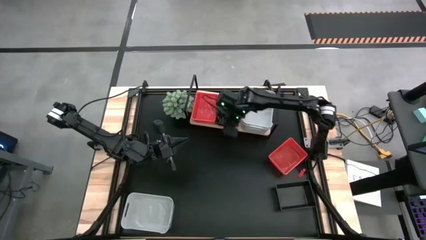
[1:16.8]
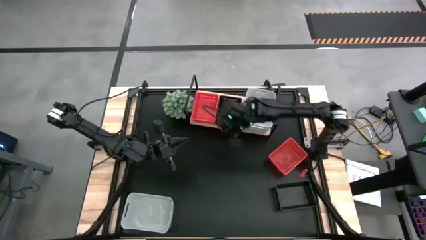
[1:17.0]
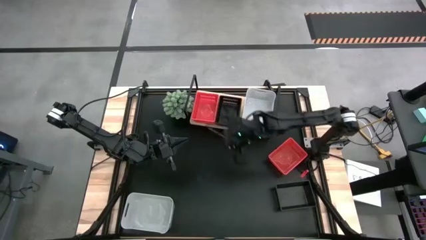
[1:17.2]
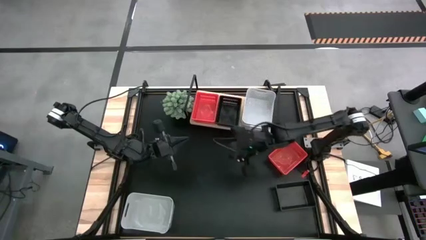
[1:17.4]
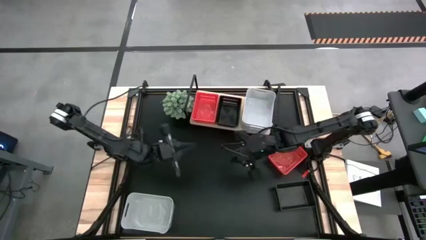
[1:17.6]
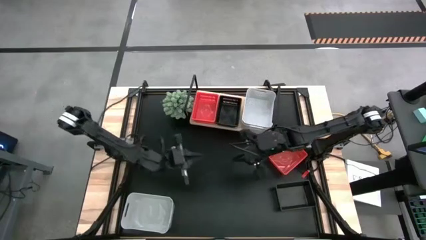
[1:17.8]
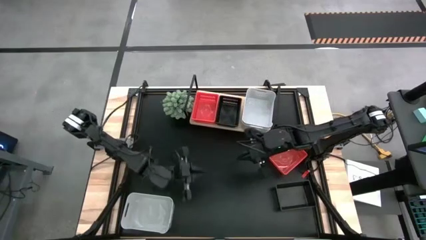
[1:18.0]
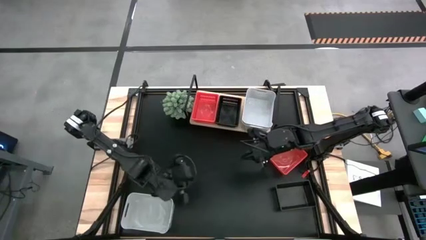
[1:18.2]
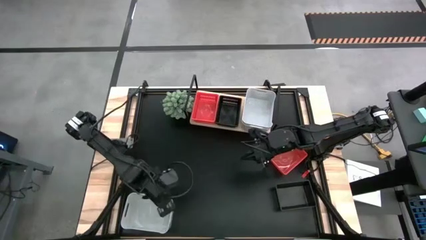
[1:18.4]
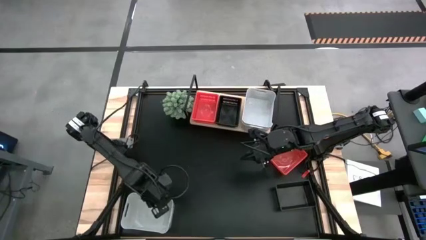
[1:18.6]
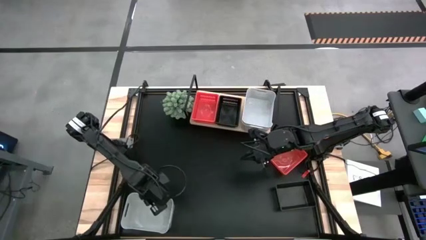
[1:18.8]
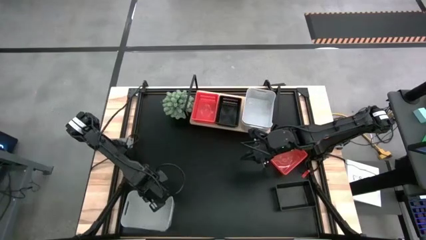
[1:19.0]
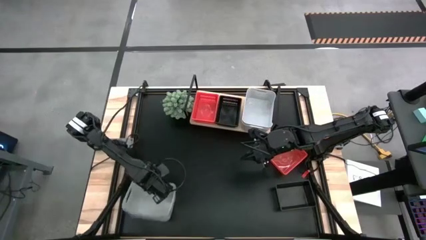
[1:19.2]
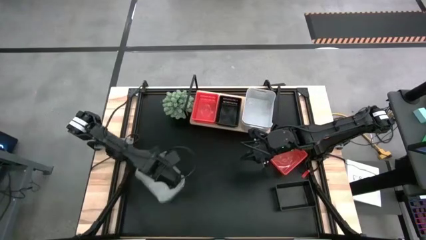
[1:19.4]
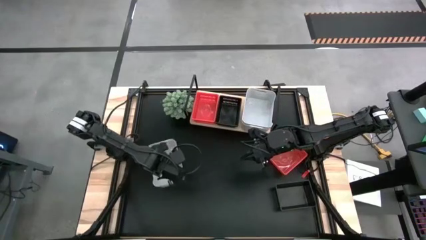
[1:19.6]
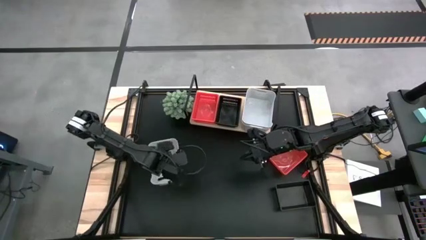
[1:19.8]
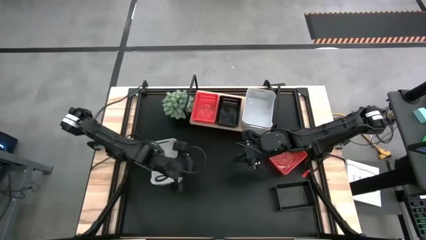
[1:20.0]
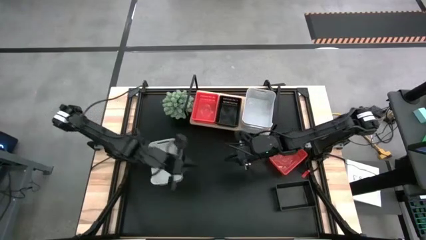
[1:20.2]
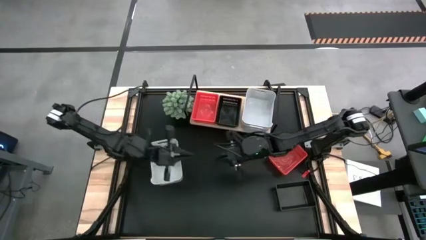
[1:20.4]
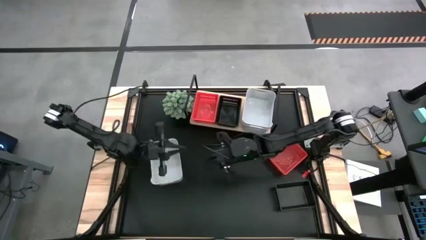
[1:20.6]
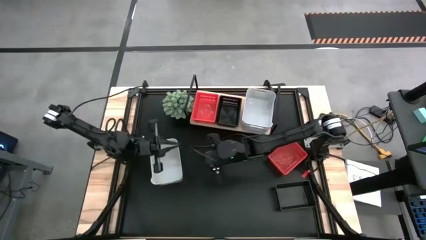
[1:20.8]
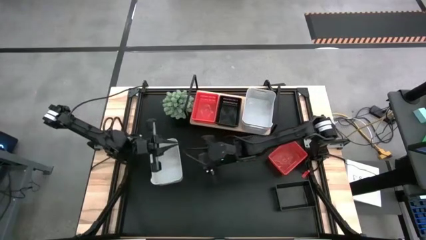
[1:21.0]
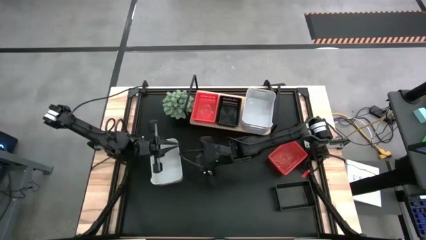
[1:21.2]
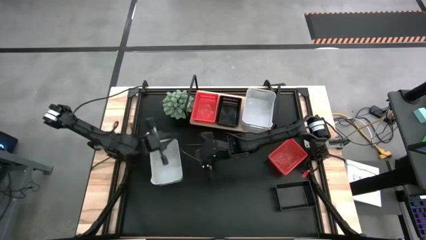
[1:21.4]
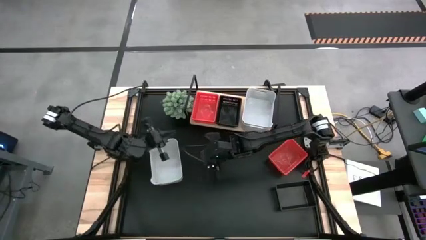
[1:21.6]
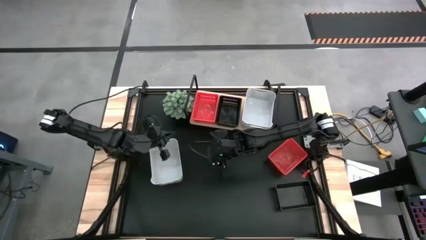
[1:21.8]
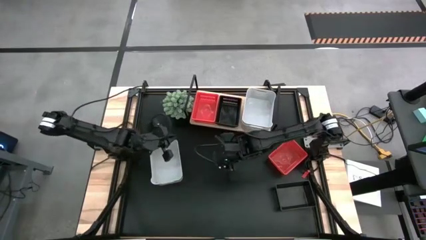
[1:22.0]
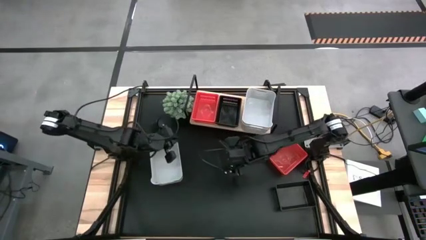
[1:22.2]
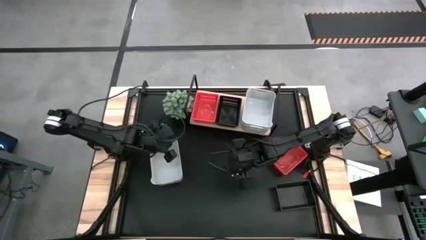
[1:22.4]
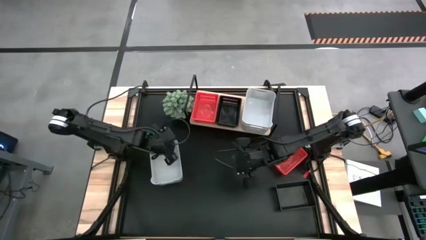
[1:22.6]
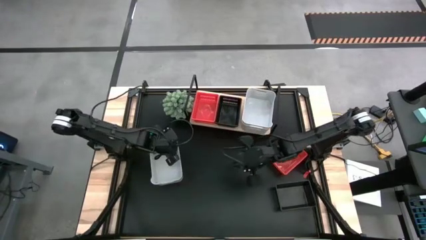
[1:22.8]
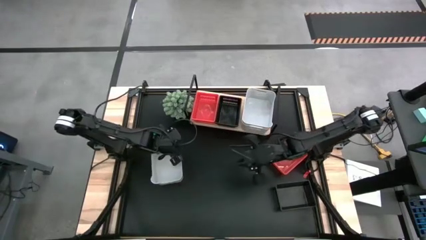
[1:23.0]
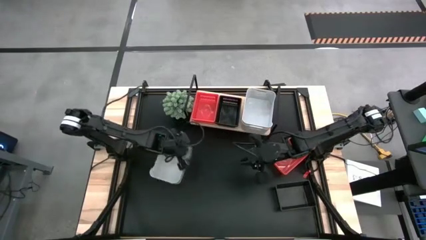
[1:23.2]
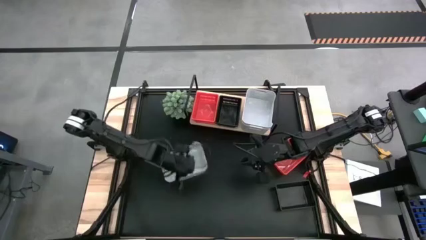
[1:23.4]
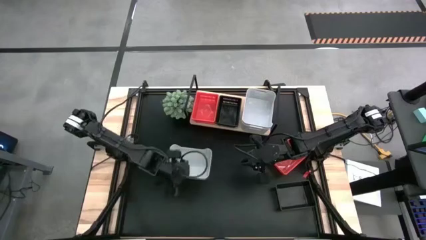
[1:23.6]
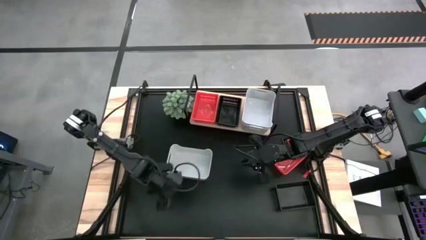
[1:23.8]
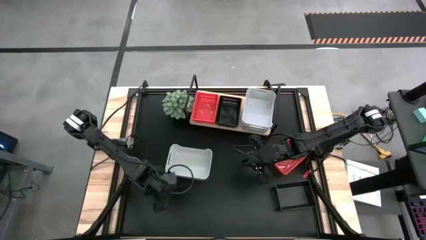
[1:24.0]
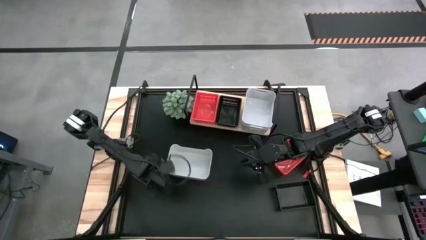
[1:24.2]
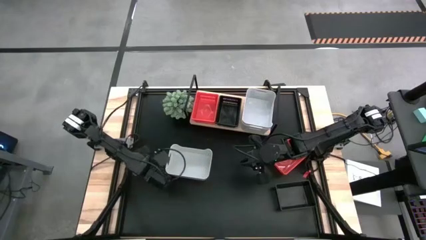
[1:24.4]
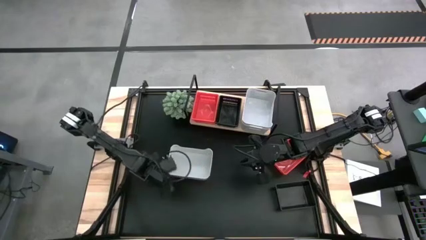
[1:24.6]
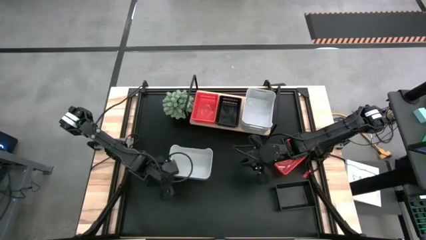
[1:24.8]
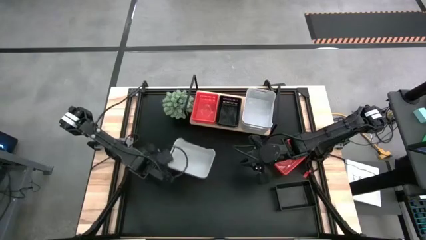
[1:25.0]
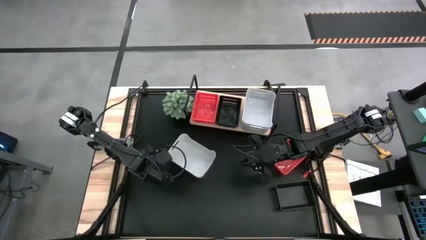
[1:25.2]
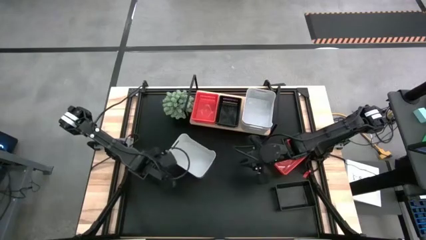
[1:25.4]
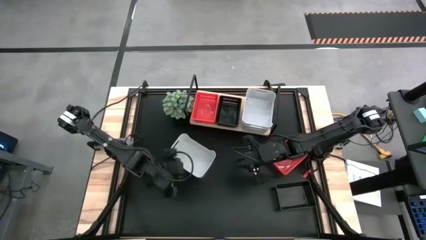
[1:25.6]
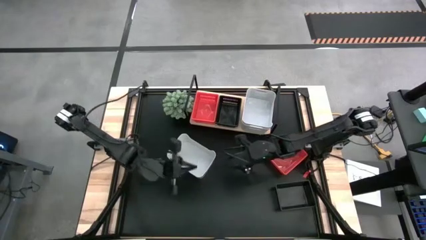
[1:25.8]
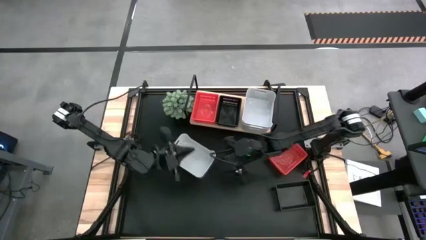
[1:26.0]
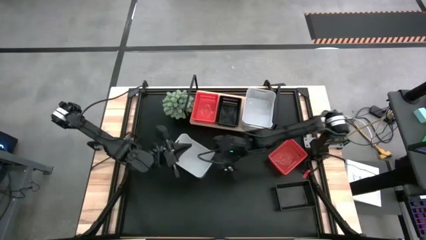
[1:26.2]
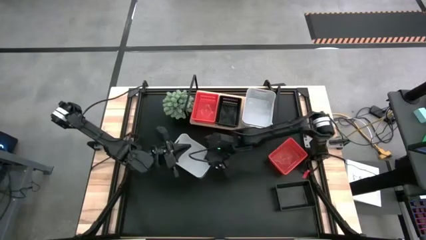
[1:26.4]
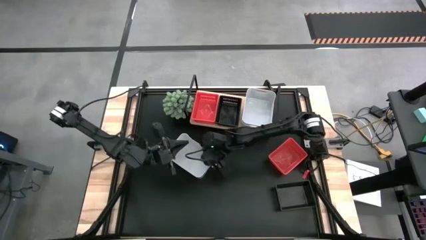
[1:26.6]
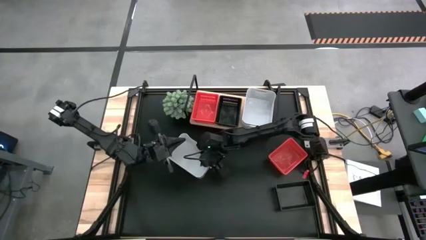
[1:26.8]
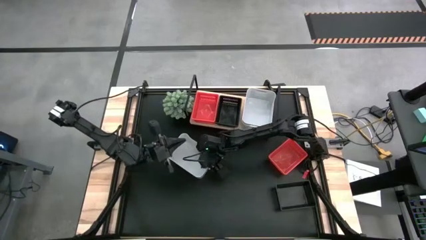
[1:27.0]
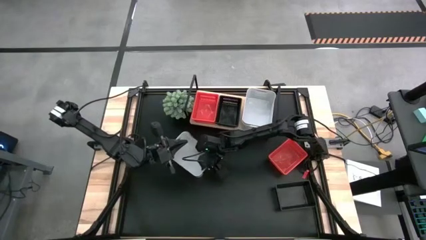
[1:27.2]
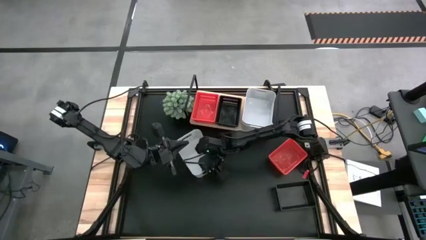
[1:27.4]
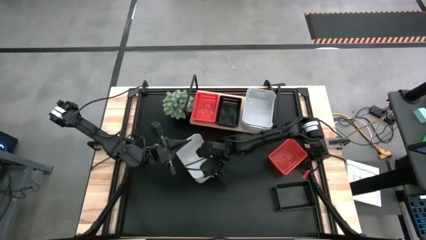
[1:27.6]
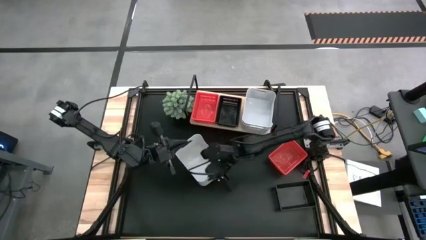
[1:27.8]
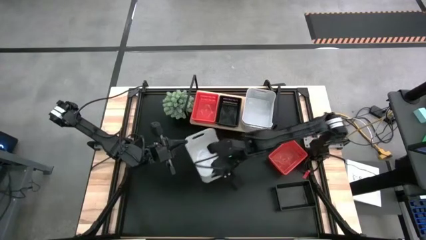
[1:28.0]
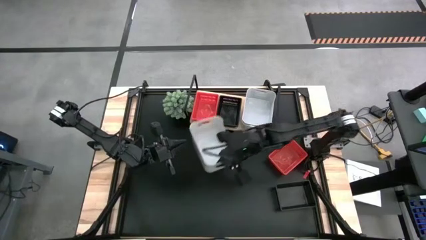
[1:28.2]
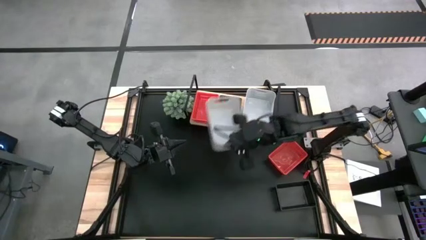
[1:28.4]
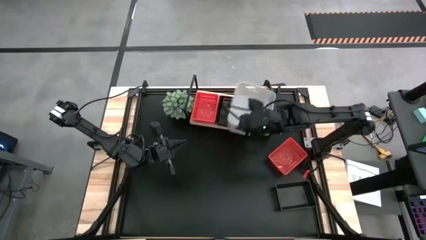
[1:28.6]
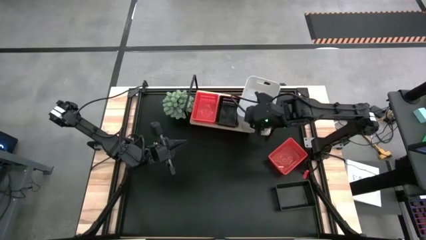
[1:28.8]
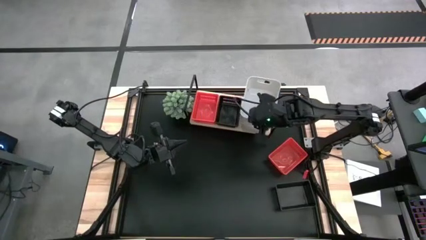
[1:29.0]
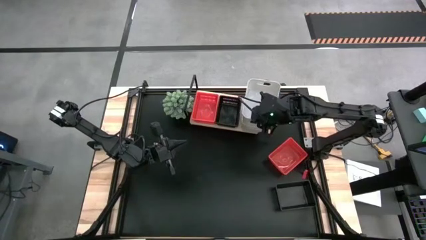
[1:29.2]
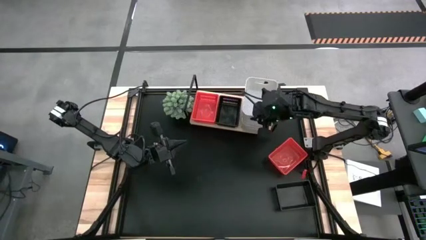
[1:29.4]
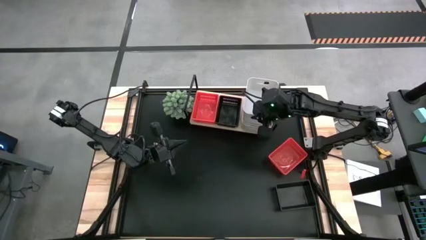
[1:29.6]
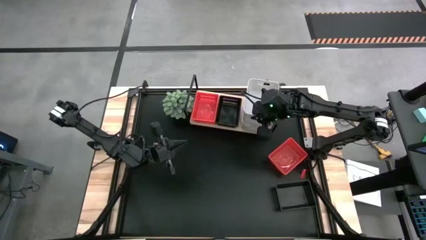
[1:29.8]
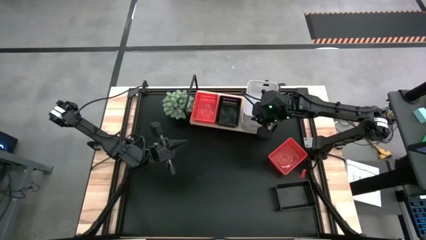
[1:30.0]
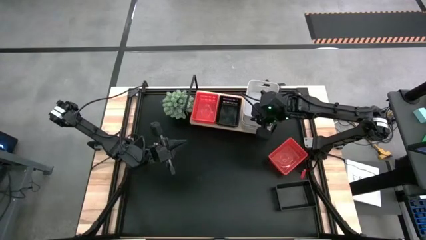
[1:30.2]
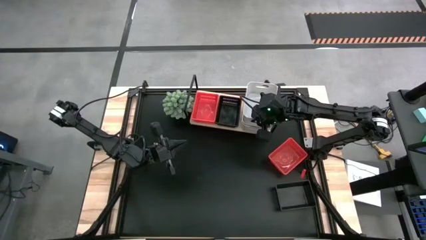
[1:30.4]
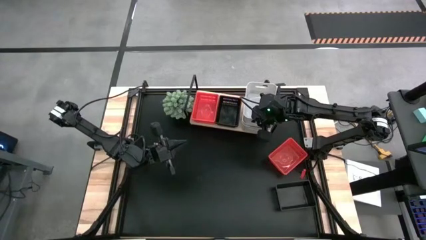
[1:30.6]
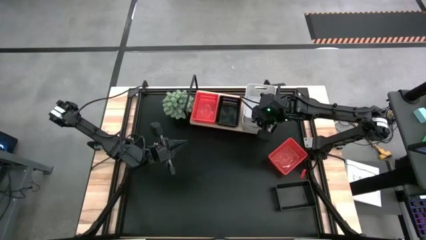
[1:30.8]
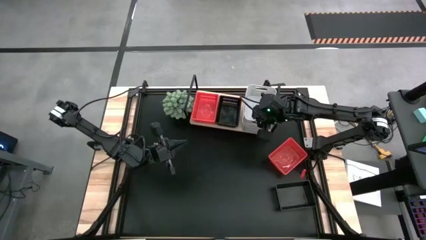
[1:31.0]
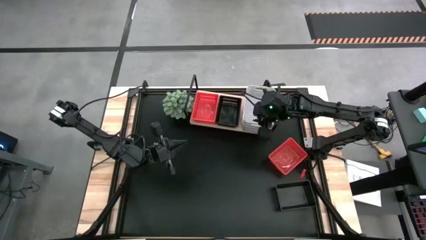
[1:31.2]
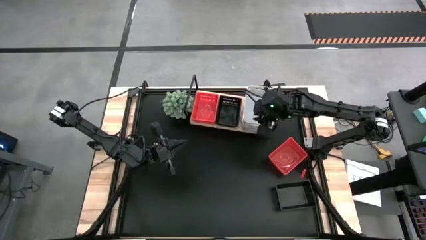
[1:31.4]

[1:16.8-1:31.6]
Task: Stack baskets on shelf by color
Stack the white bin on top of the white bin on the shelf
